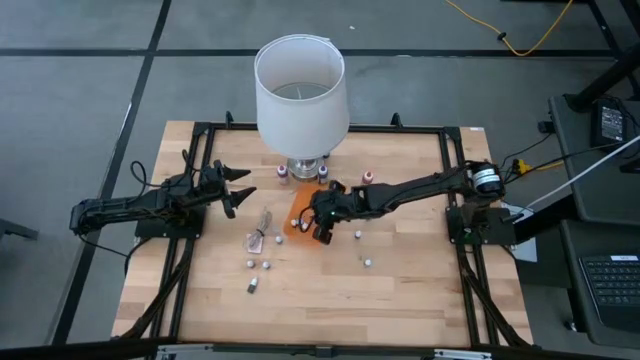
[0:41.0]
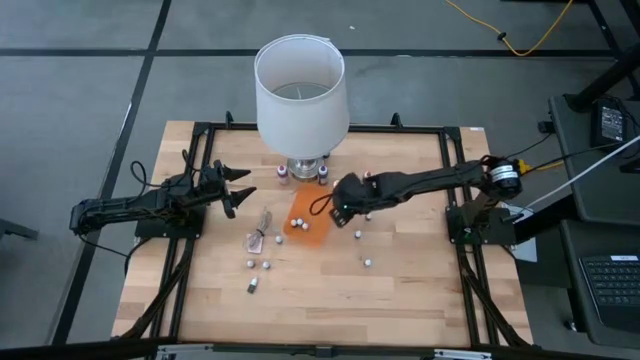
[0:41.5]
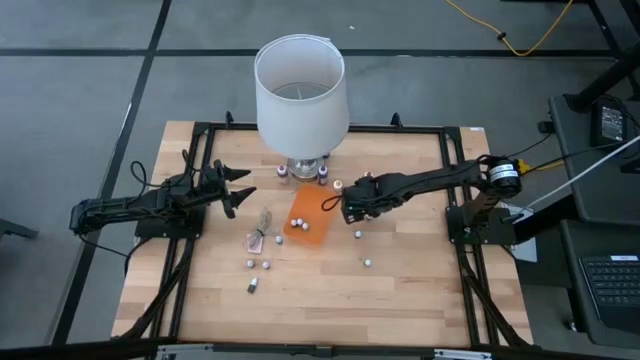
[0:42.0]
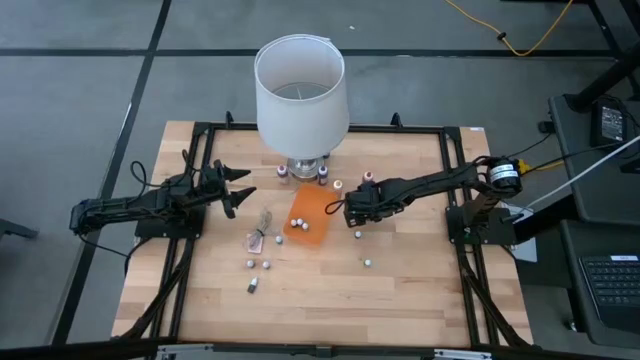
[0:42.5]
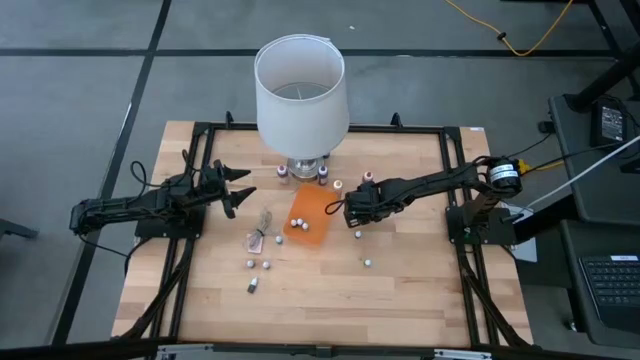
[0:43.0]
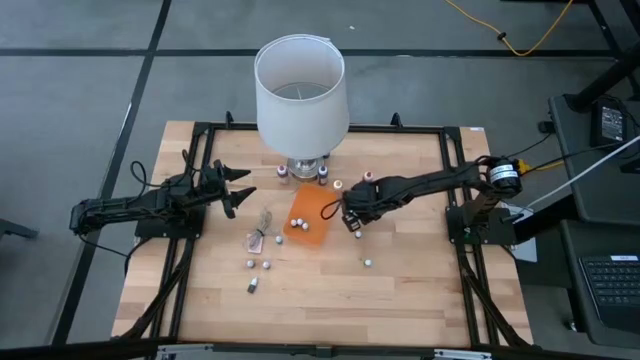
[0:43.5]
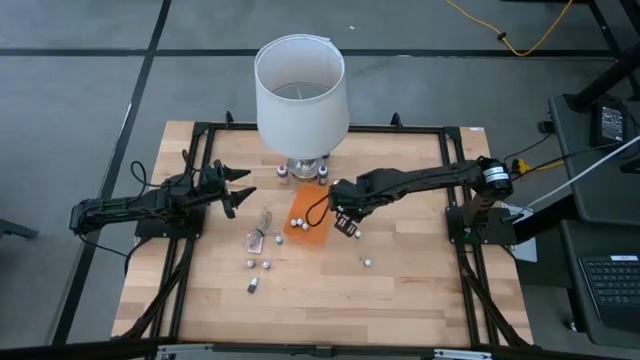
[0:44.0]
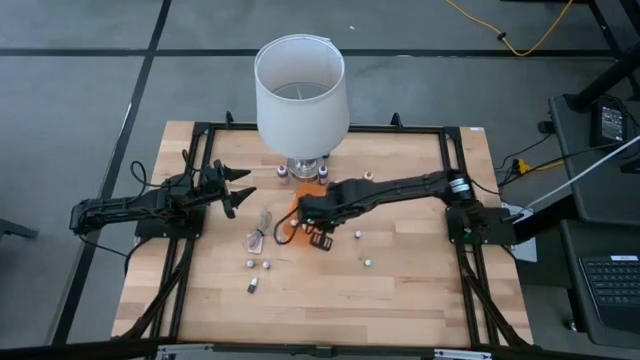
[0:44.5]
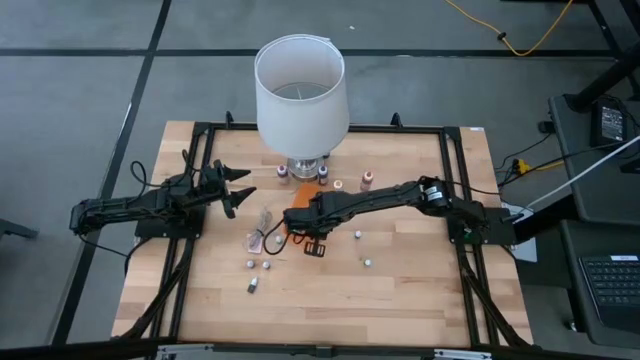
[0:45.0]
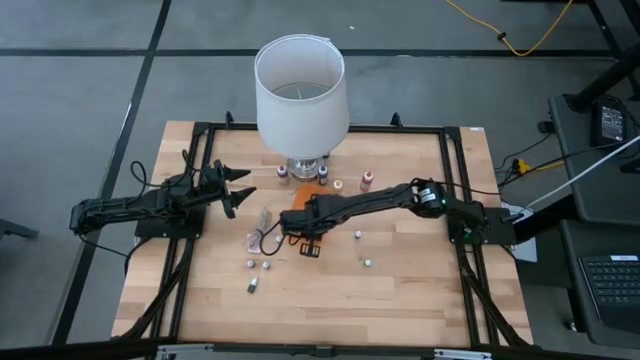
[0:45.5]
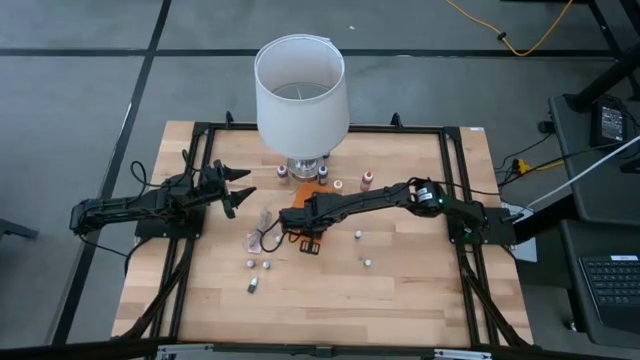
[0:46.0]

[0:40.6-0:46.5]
Task: Pick & Place food coloring
Put the small black food coloring bottle into the bin

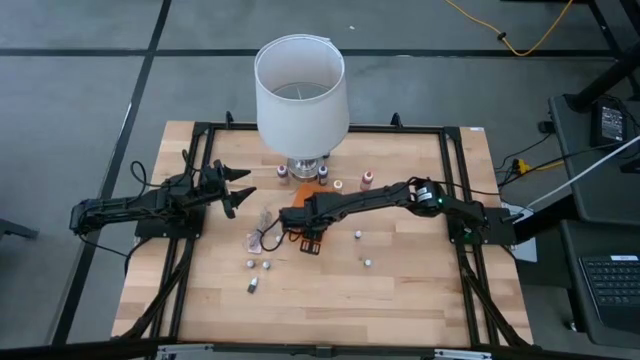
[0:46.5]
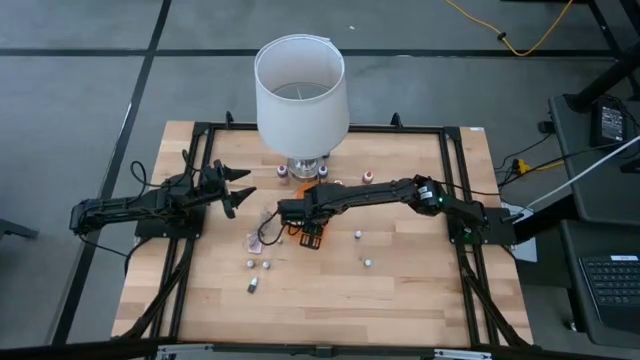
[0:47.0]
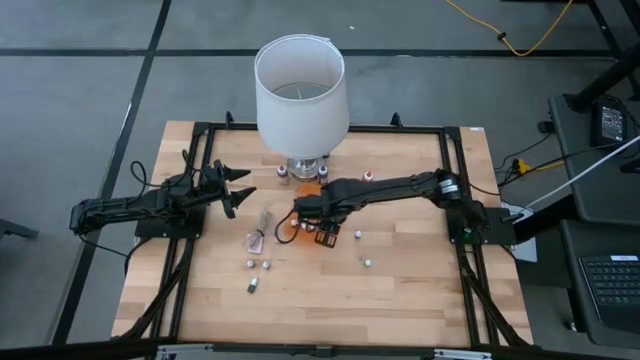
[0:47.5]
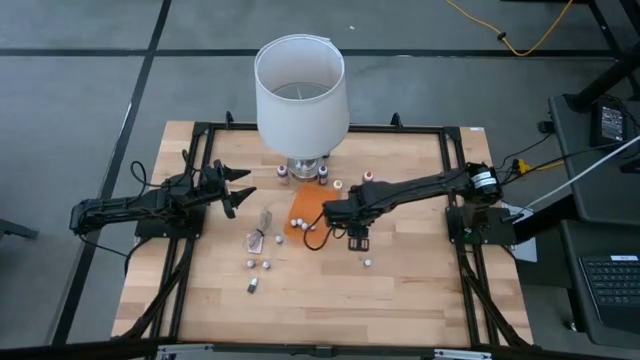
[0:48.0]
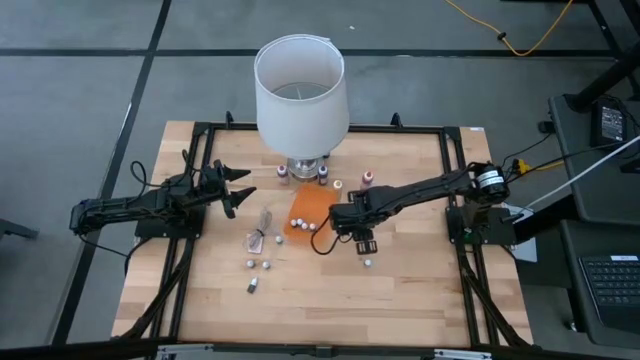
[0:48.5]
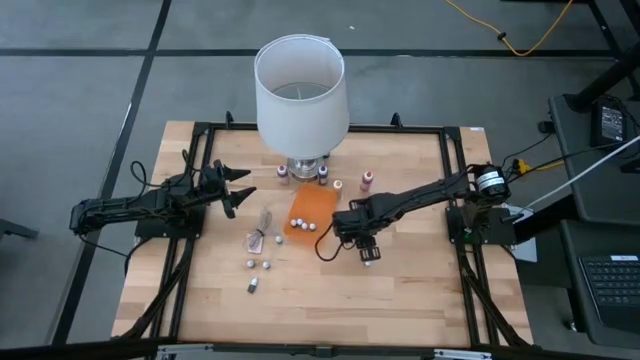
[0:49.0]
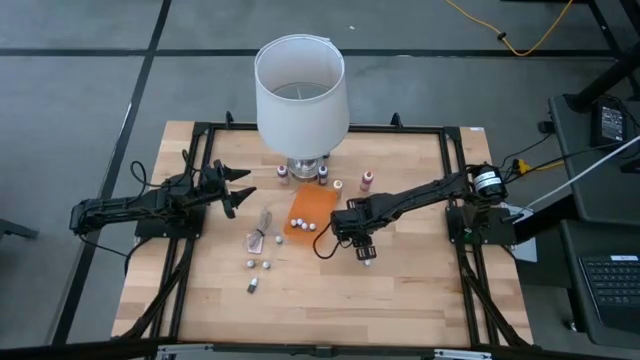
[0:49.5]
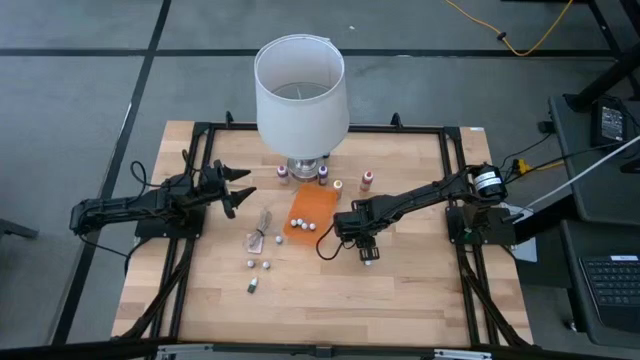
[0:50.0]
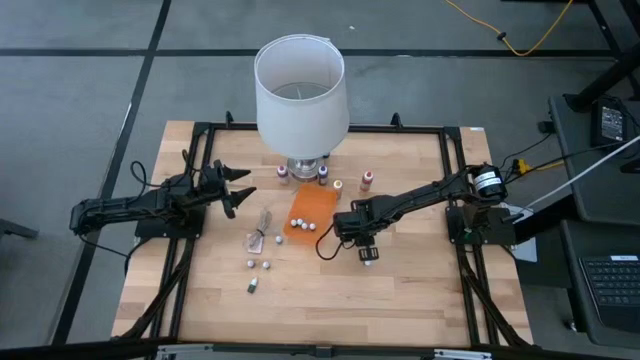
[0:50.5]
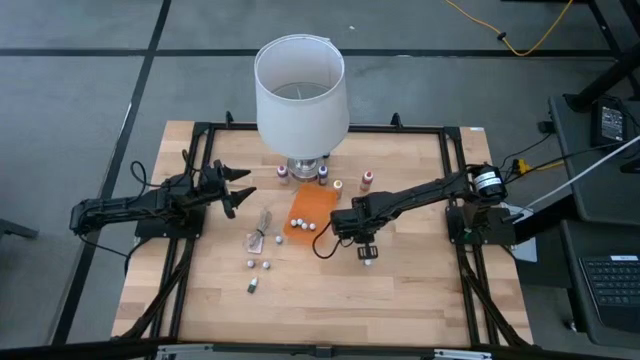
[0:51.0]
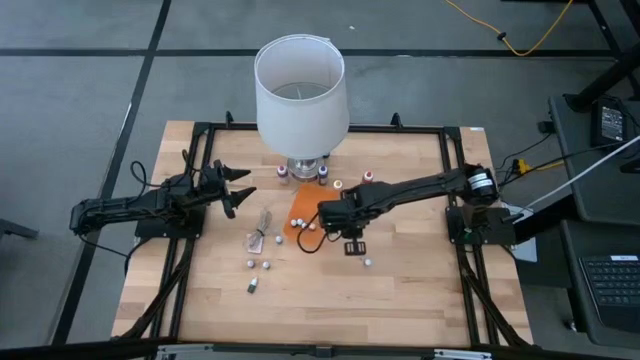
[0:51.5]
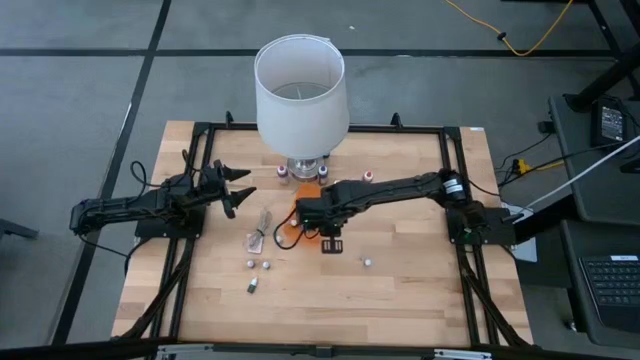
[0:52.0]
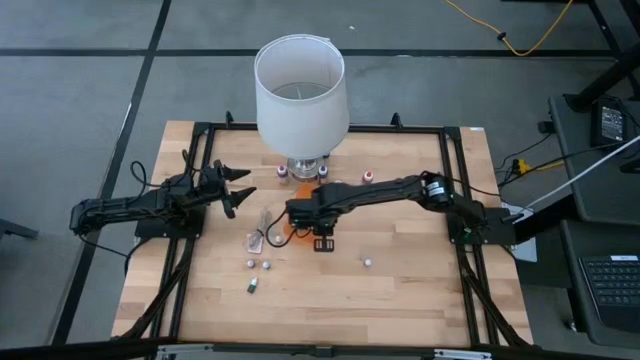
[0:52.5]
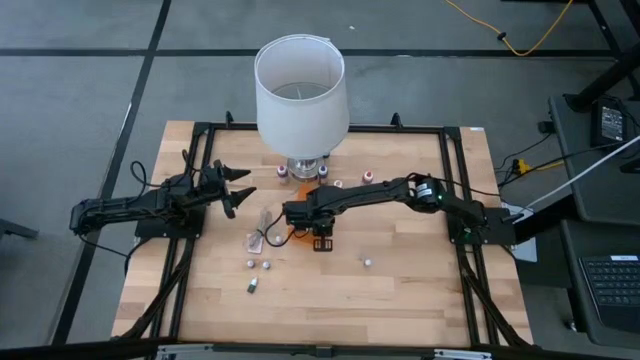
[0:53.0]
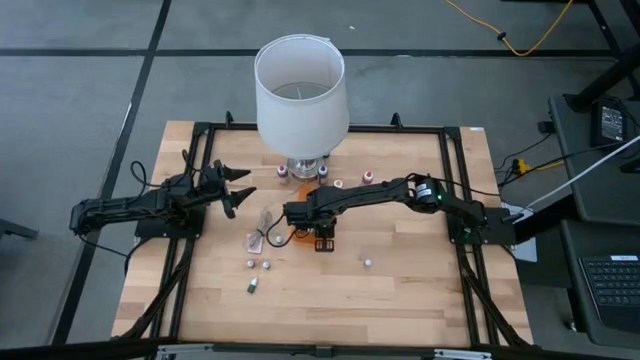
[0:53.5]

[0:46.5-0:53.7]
Put the small red food coloring bottle into the orange bin

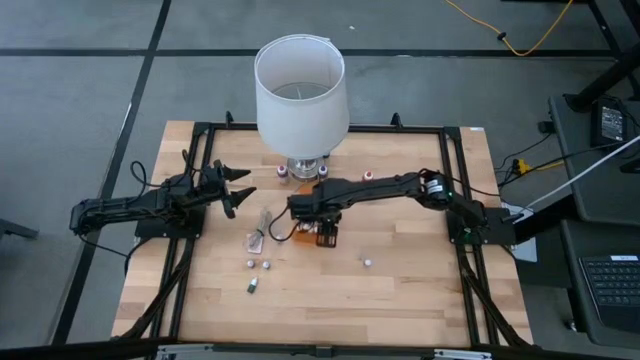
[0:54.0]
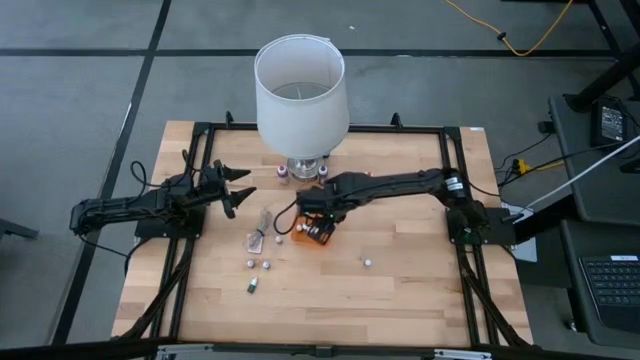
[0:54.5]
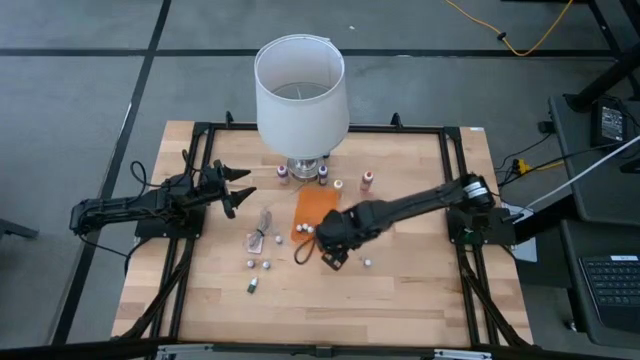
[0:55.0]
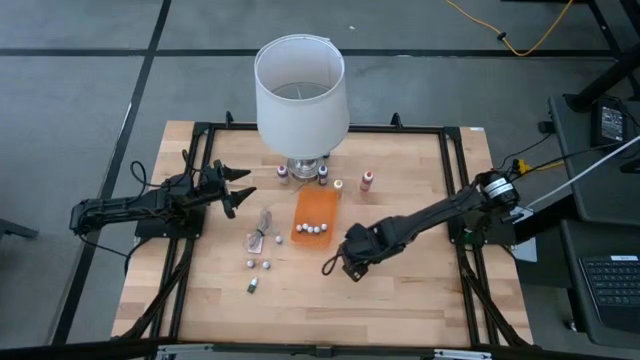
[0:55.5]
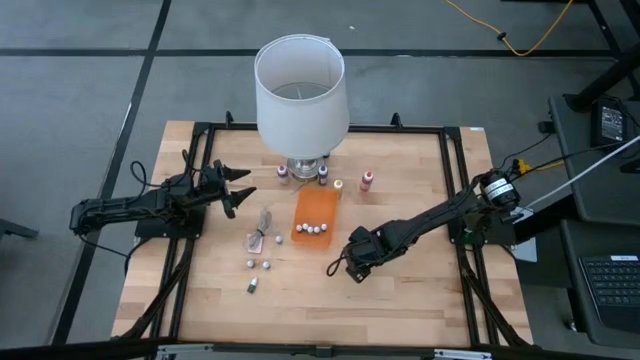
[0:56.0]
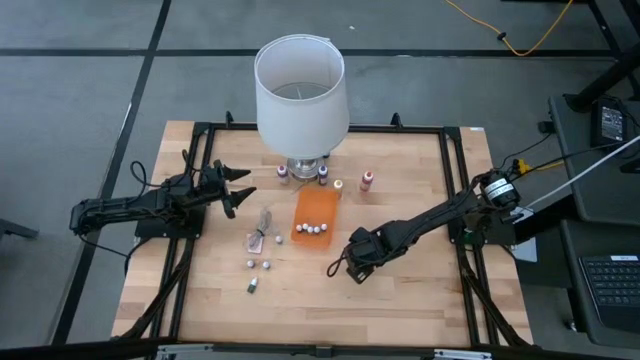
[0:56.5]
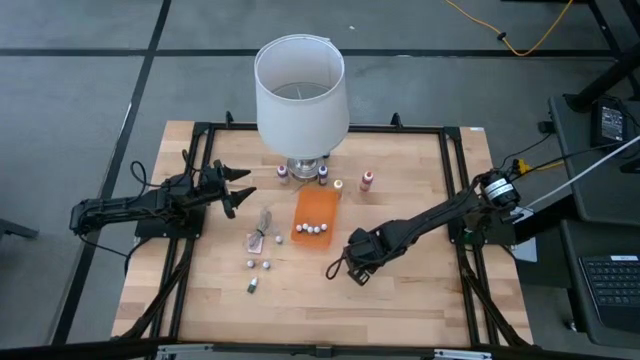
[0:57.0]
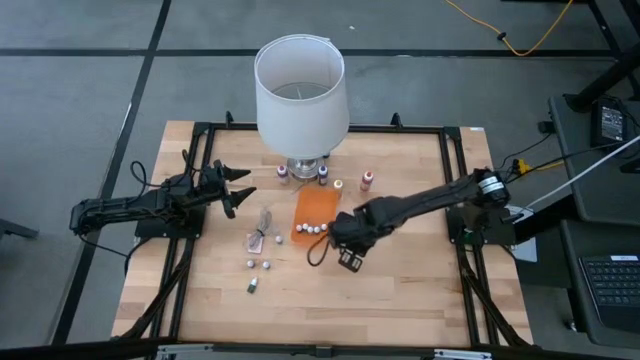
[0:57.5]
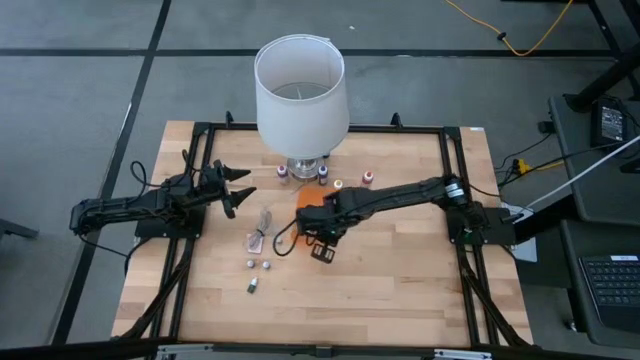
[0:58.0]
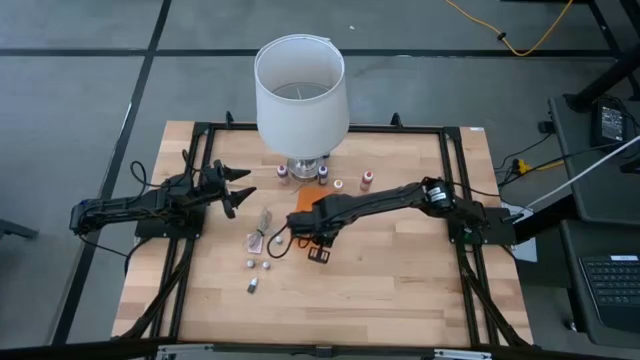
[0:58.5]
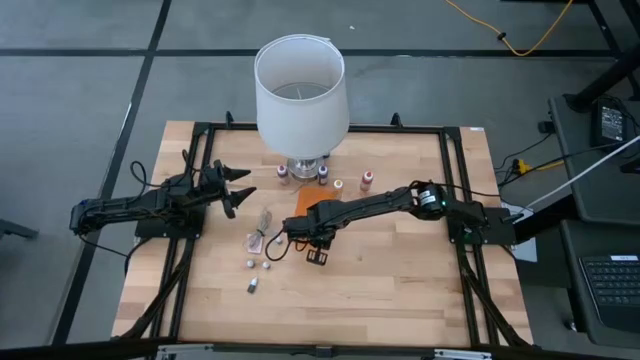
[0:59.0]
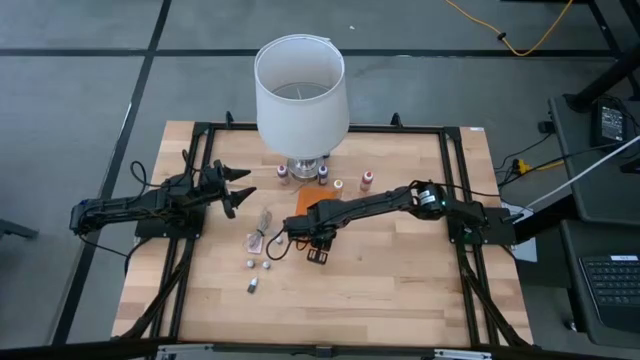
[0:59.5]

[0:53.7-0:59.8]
Put the small purple food coloring bottle into the bin

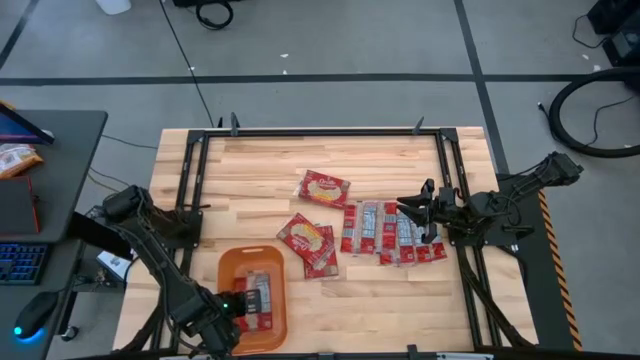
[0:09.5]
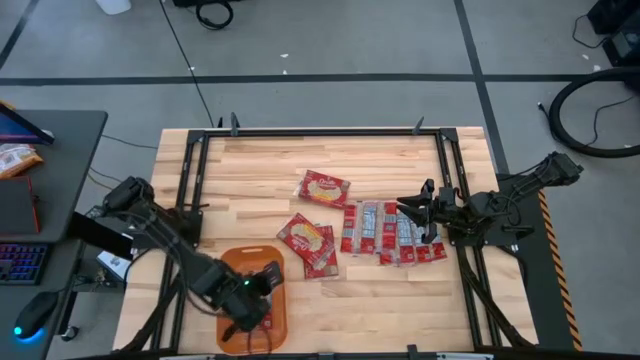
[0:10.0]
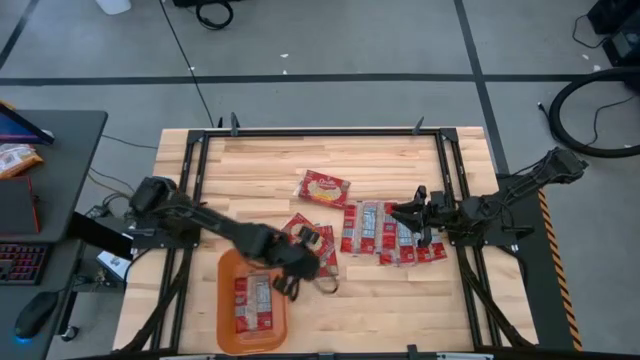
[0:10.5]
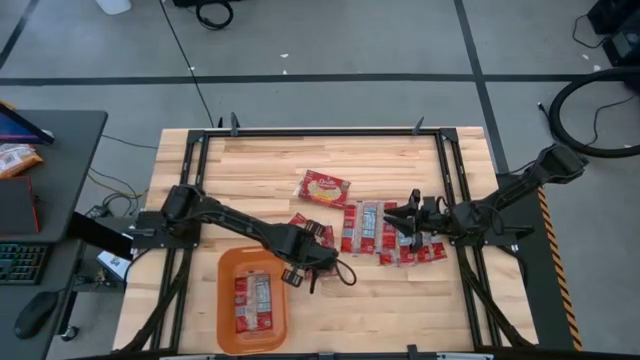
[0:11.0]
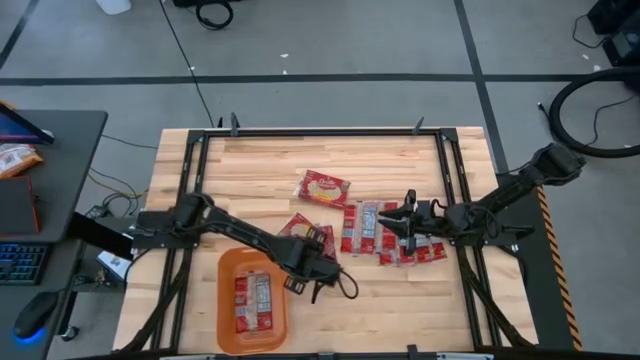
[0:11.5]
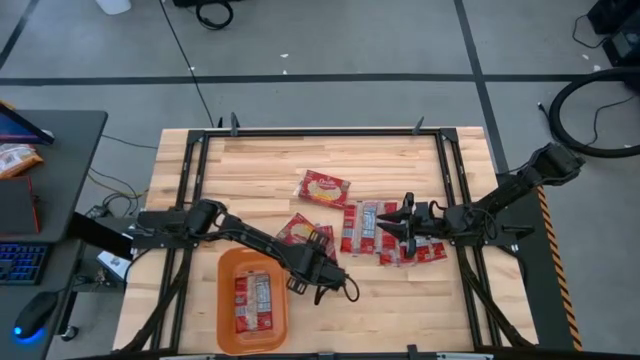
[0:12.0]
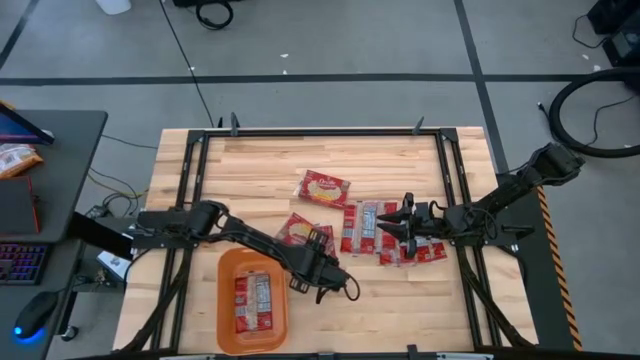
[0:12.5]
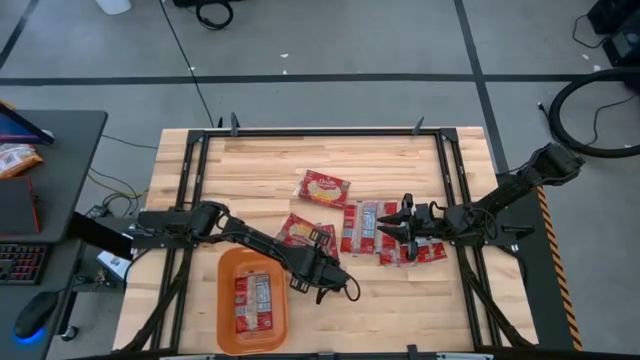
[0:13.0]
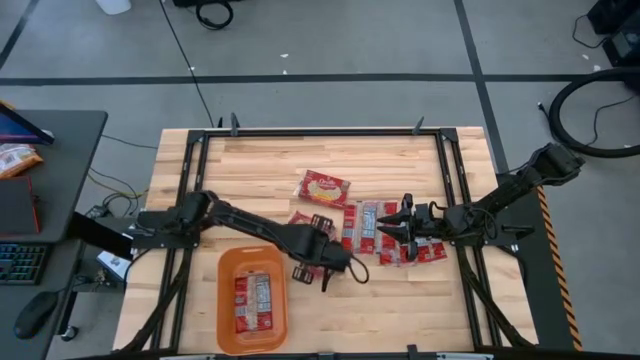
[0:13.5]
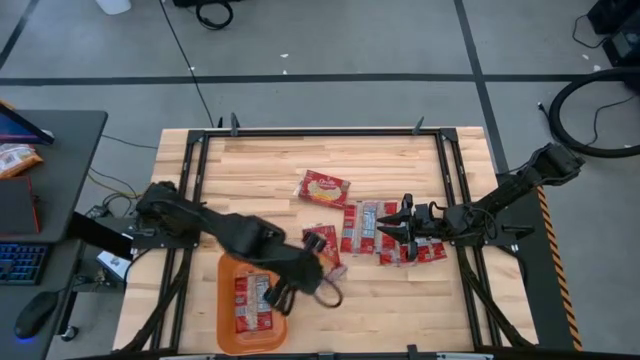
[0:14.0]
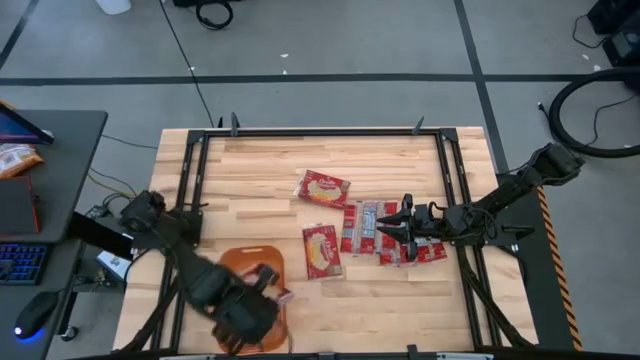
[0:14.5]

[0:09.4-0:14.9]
Task: Sort popcorn bags into baskets
Put the red popcorn pack into the orange bin
